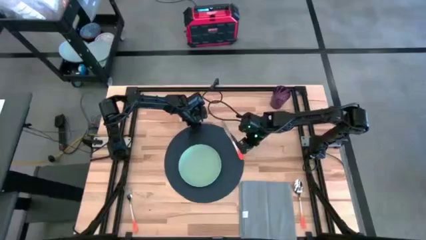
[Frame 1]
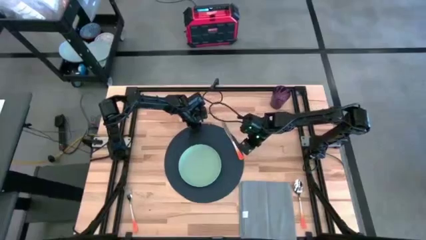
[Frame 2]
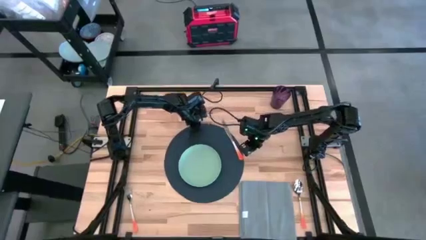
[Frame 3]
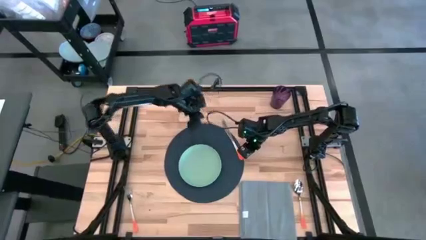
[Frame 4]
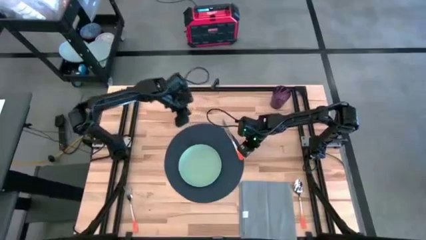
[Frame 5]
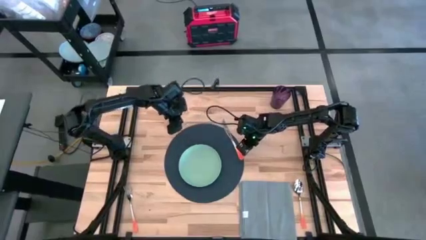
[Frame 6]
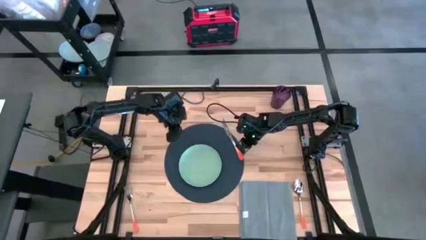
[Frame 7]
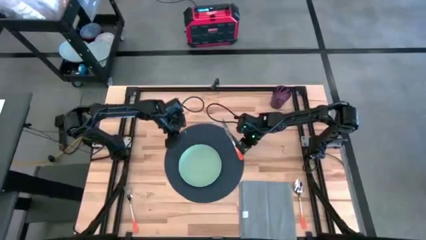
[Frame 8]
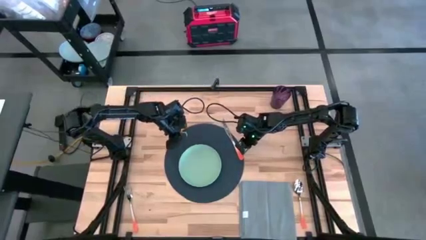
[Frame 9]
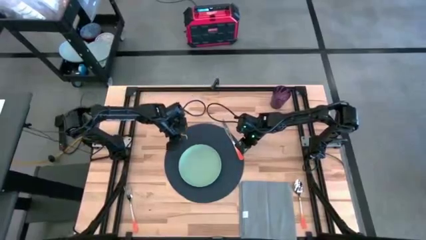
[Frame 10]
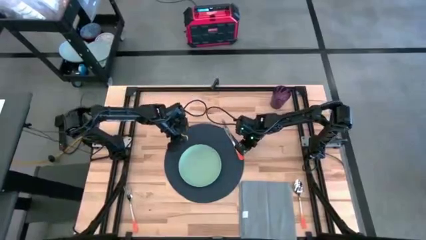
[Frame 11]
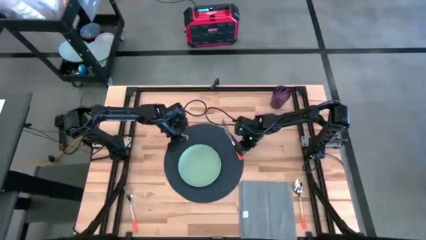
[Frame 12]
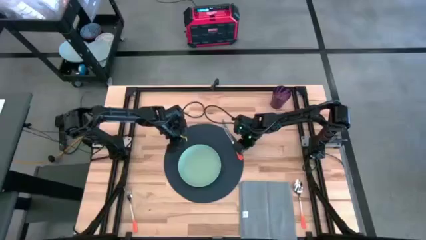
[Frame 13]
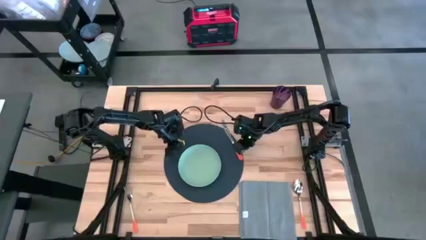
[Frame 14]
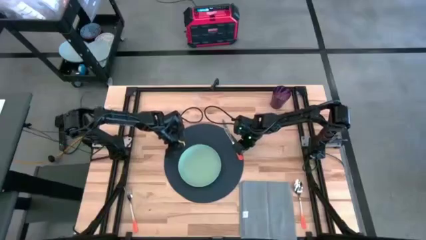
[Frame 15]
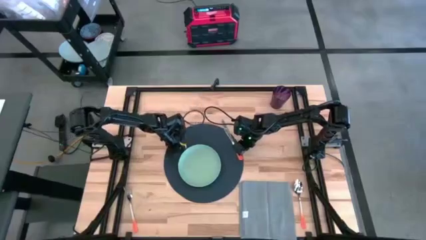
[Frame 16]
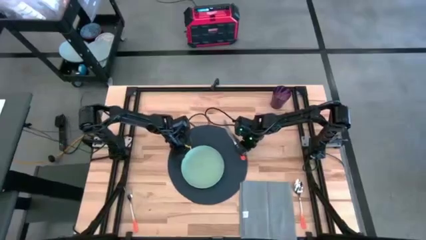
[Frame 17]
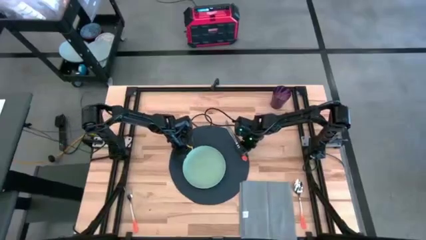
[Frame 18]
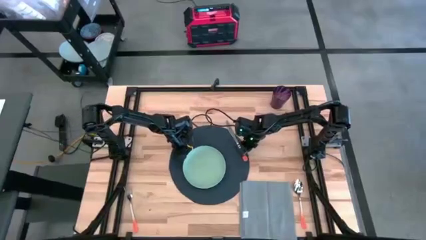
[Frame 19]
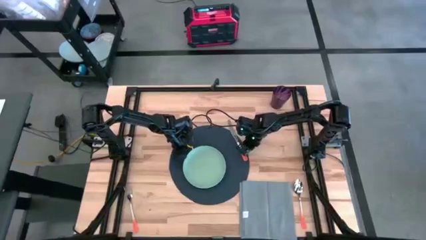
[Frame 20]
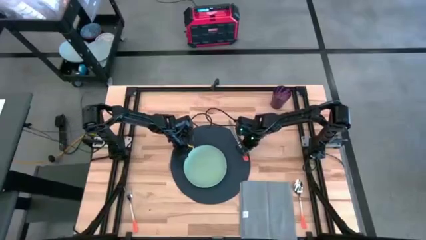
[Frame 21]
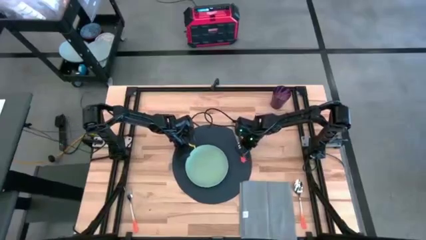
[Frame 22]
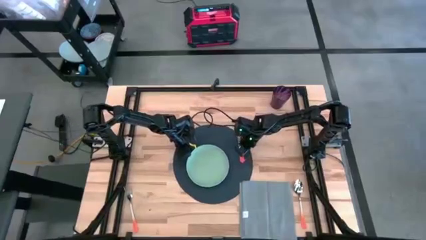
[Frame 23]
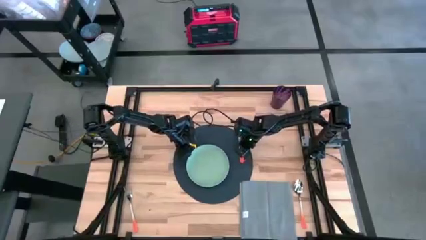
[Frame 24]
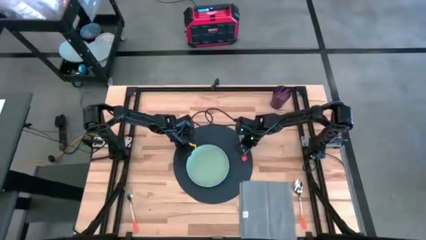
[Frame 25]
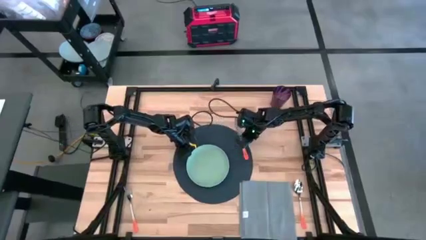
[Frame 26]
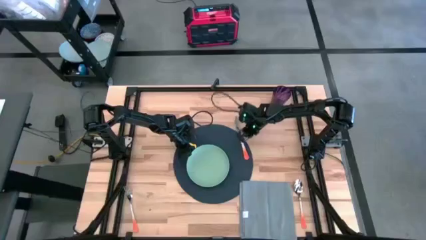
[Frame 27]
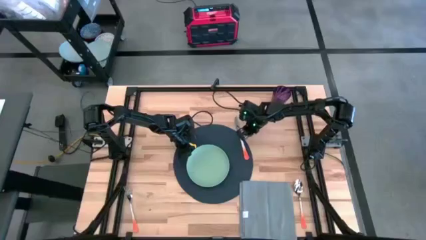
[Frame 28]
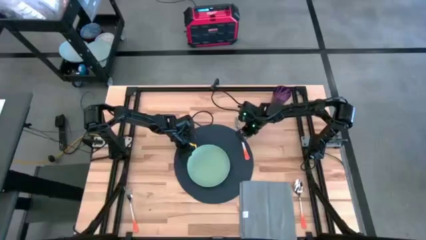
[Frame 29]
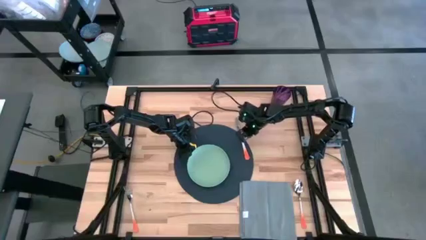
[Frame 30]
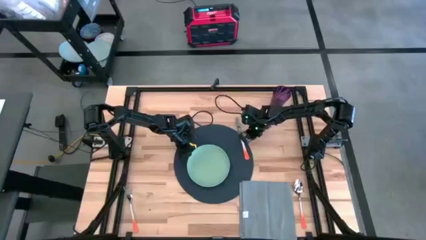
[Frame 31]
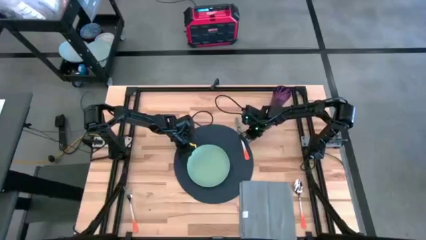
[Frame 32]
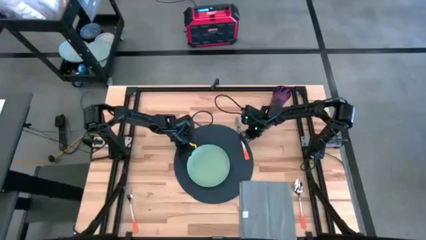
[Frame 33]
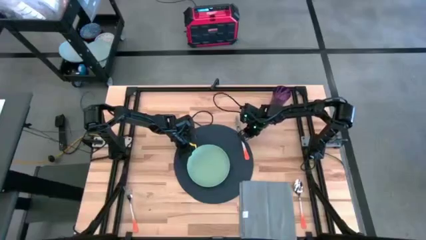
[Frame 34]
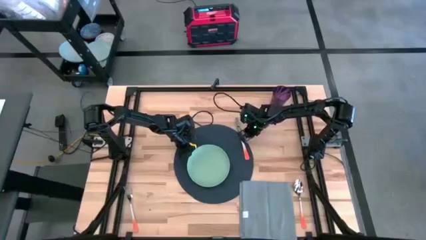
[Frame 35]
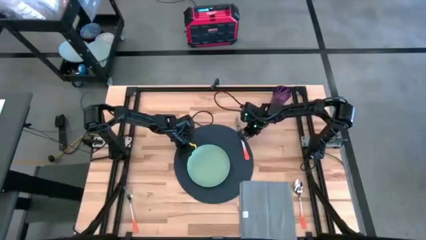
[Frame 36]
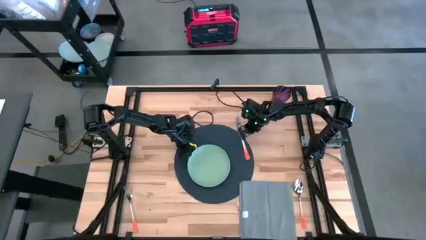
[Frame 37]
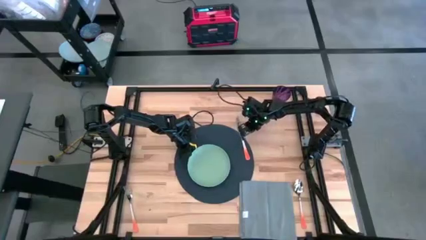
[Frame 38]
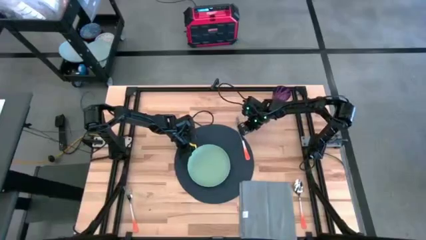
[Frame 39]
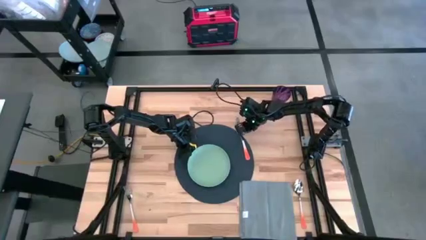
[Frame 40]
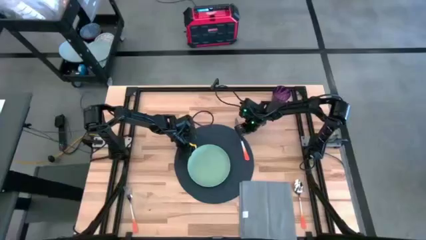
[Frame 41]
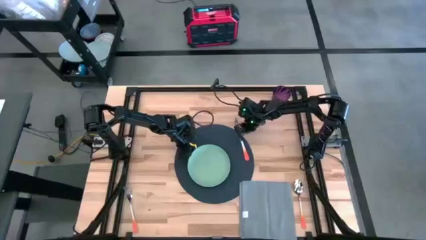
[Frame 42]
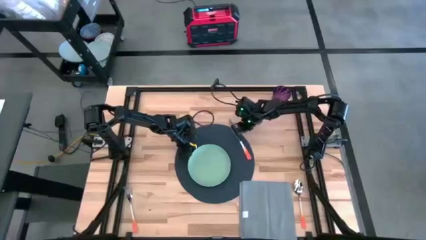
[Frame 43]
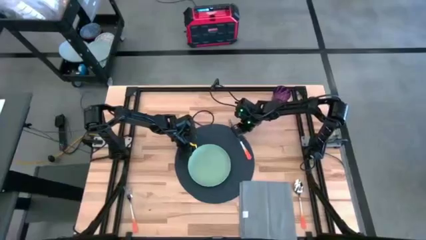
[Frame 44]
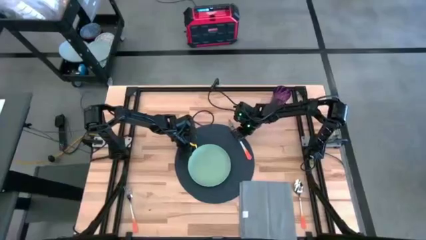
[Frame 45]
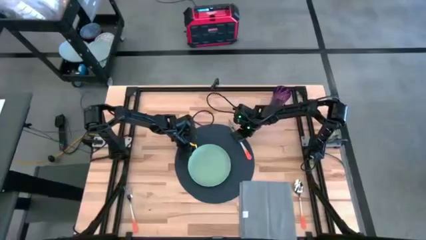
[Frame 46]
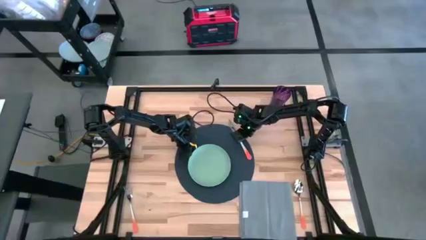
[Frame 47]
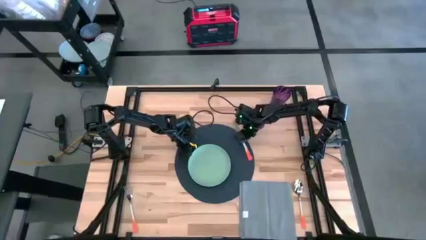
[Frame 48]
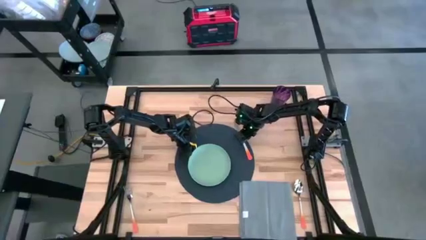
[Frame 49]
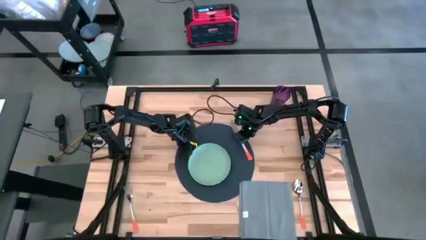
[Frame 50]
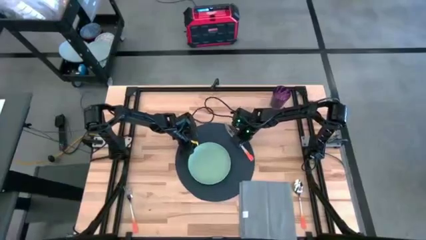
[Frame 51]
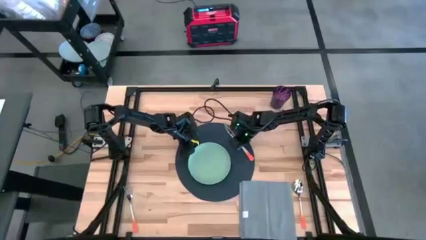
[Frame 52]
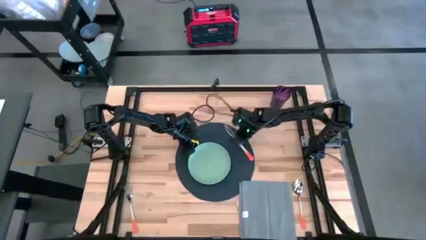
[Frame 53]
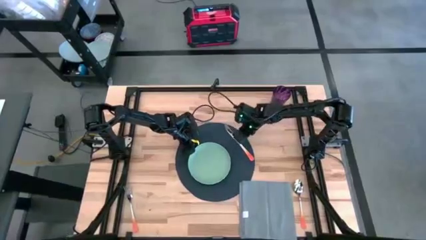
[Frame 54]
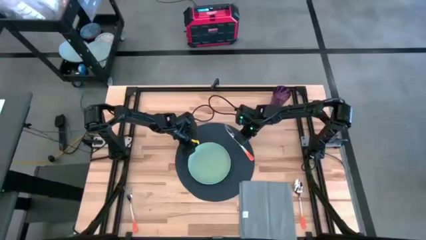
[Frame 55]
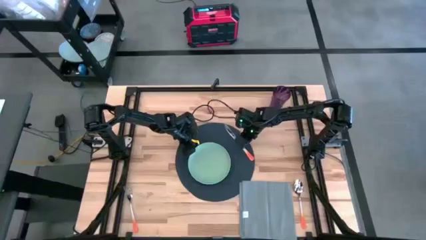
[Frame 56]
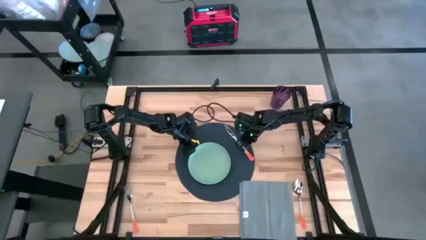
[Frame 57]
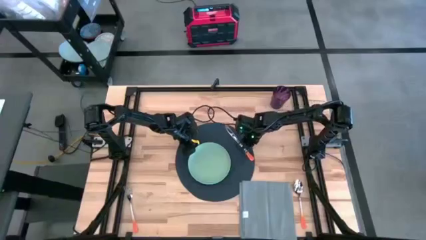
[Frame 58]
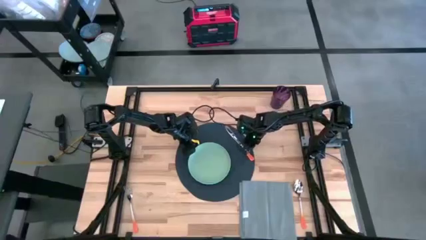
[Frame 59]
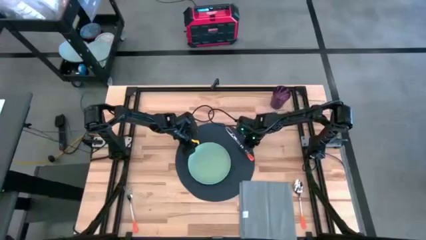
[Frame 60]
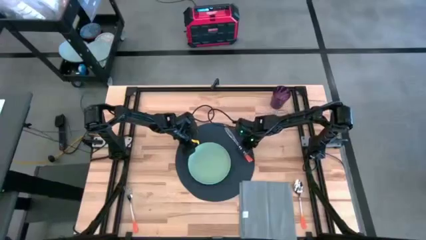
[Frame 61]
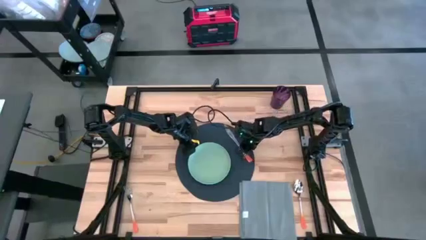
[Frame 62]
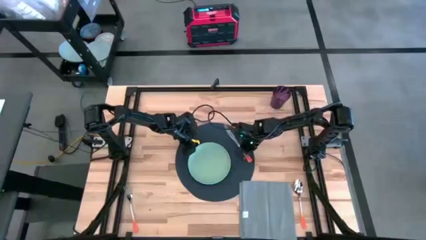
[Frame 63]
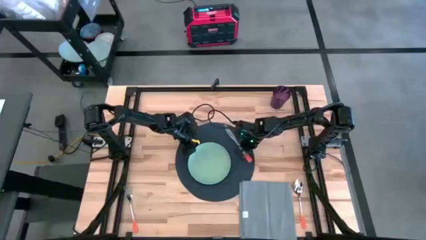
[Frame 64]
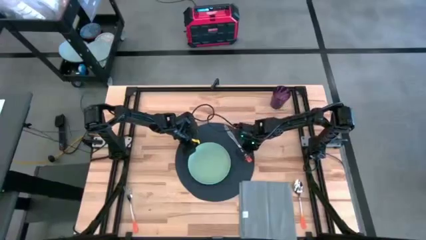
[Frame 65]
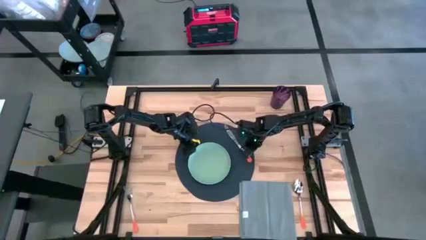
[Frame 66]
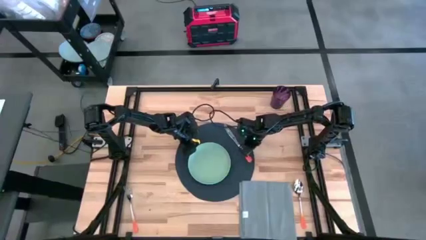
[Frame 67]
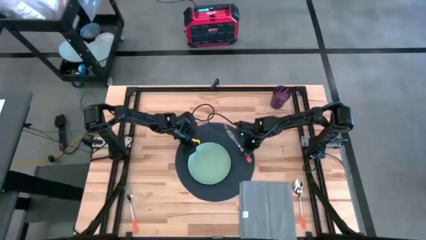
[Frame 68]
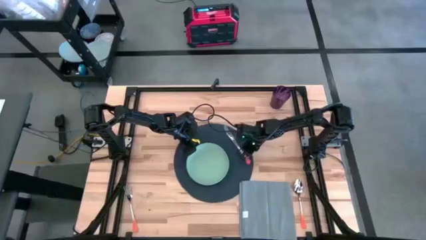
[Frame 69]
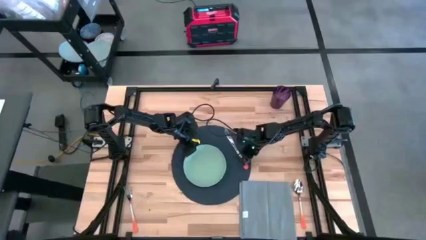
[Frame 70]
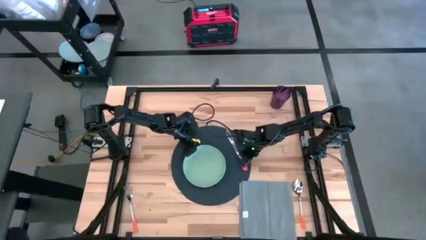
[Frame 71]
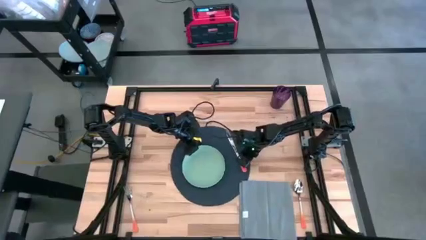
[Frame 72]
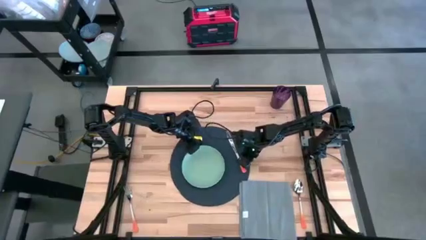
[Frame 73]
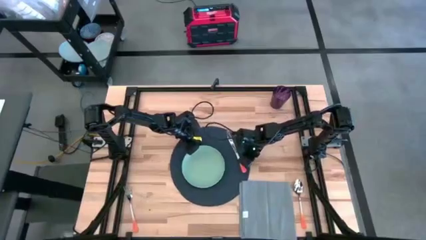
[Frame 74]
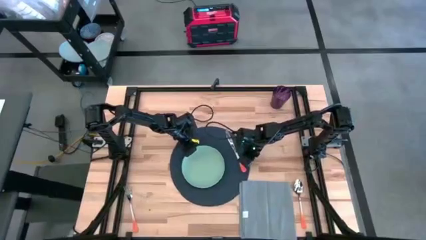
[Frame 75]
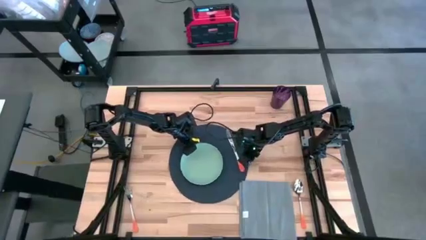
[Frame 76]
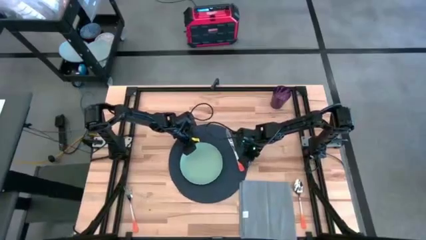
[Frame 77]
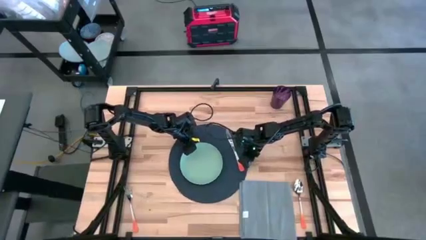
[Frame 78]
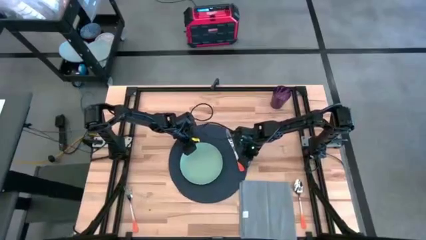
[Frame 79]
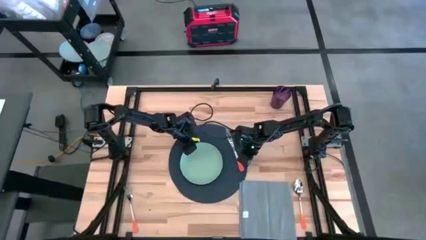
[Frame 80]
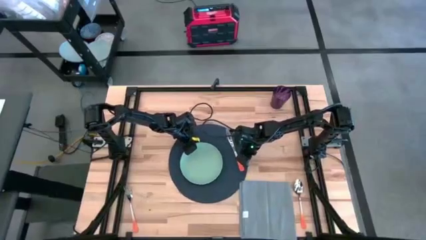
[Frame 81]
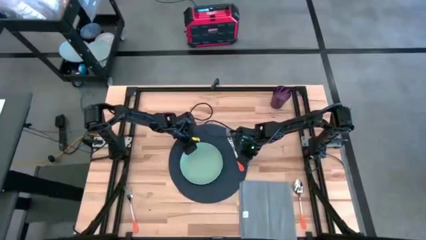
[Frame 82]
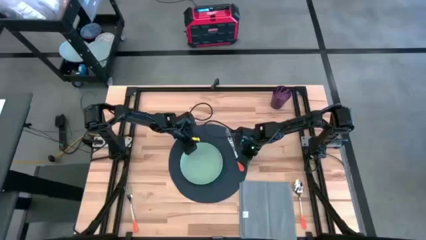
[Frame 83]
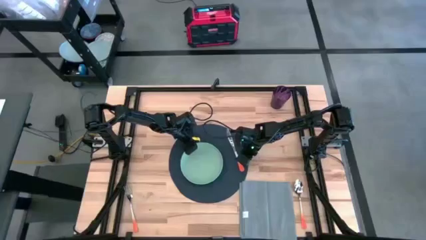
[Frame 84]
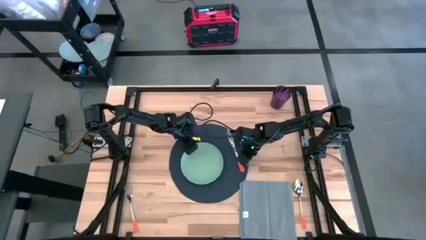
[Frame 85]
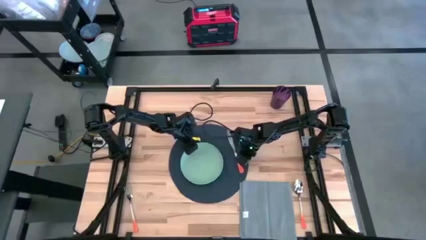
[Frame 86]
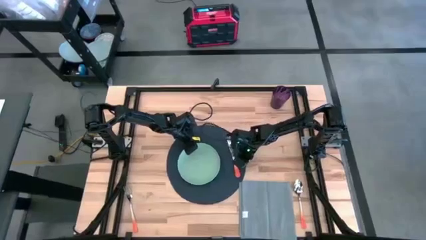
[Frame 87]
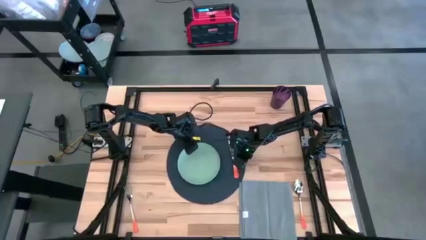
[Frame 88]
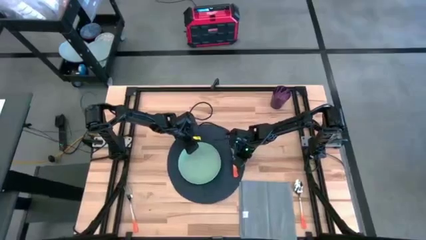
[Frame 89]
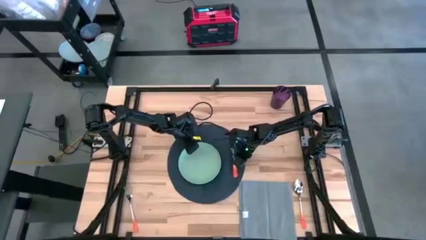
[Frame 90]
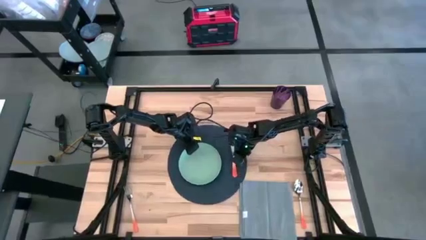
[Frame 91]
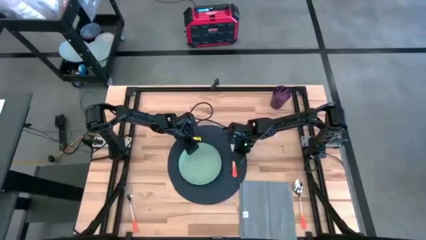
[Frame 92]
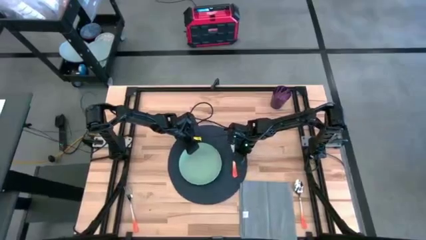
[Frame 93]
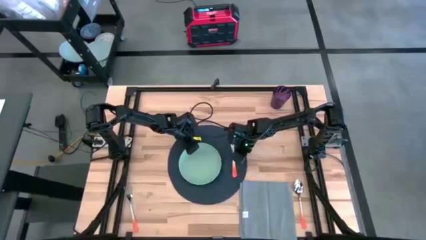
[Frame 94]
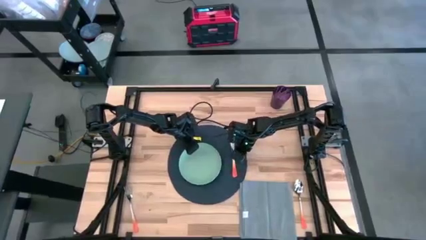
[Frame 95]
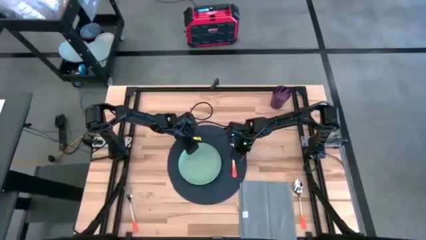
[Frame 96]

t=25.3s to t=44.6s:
Task: Set table place
Put the orange knife on the blue placemat to the right of the green plate
